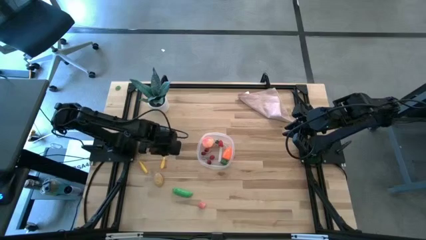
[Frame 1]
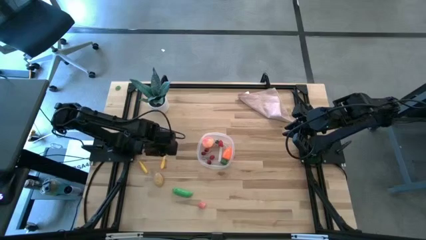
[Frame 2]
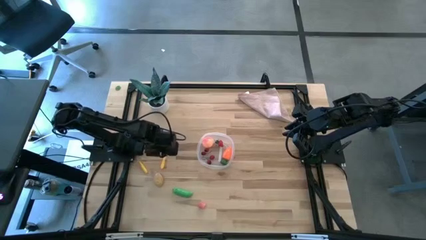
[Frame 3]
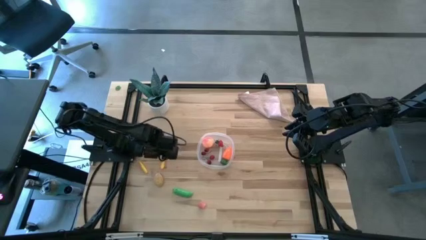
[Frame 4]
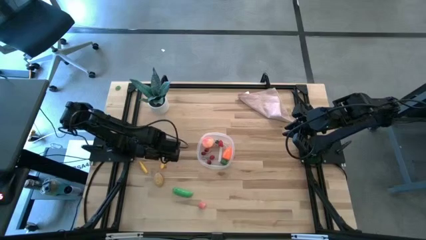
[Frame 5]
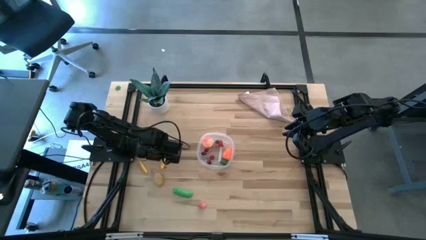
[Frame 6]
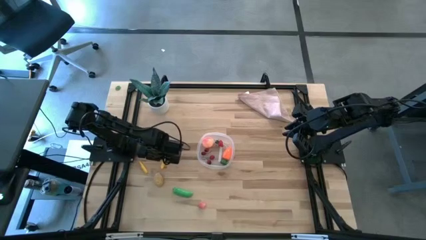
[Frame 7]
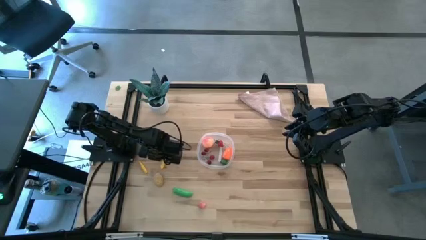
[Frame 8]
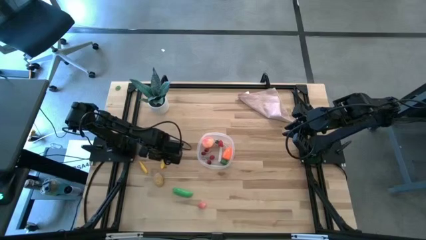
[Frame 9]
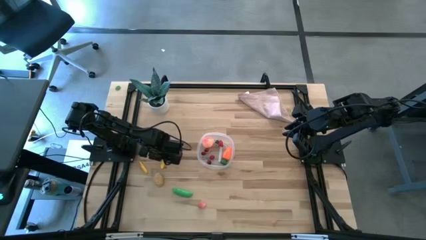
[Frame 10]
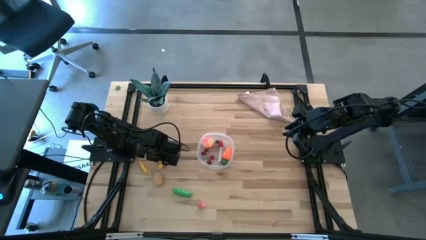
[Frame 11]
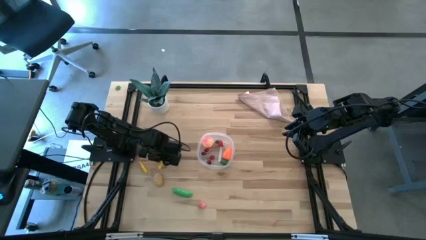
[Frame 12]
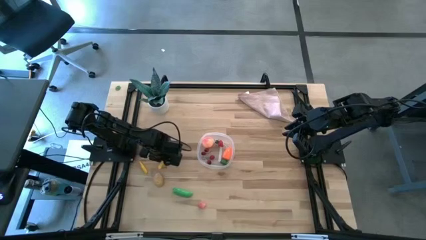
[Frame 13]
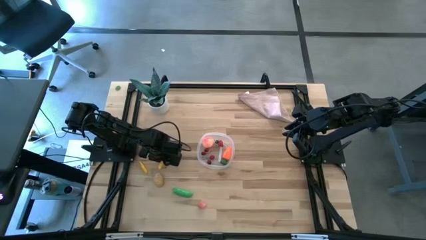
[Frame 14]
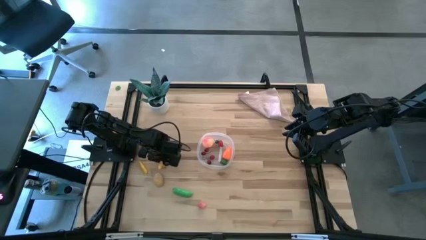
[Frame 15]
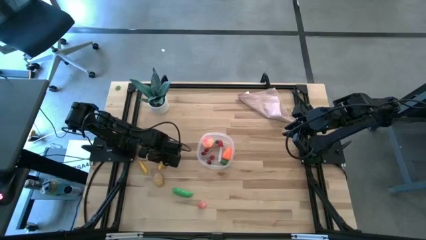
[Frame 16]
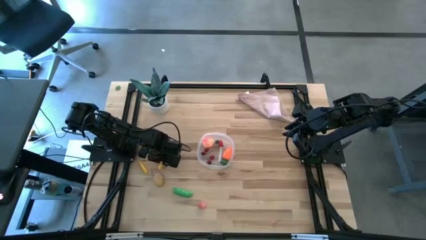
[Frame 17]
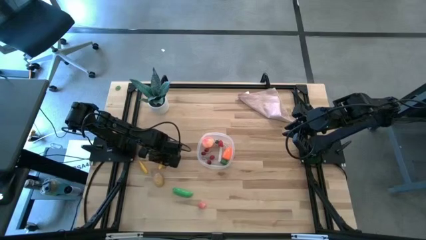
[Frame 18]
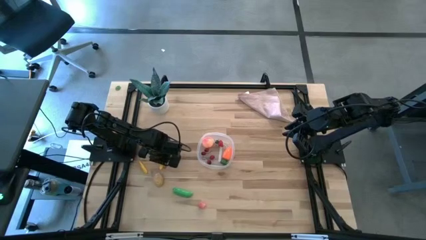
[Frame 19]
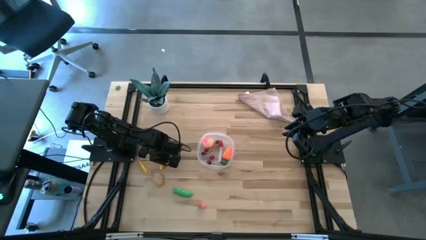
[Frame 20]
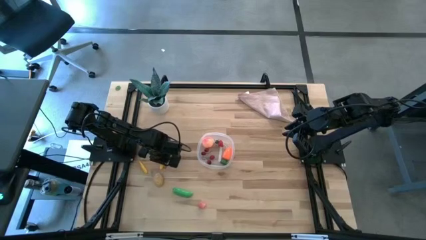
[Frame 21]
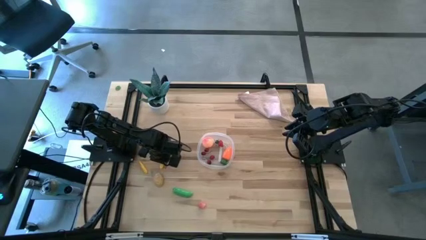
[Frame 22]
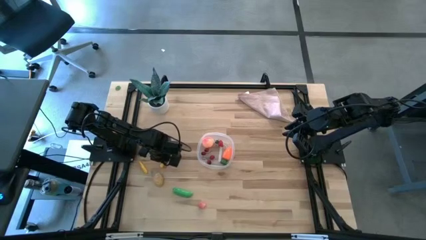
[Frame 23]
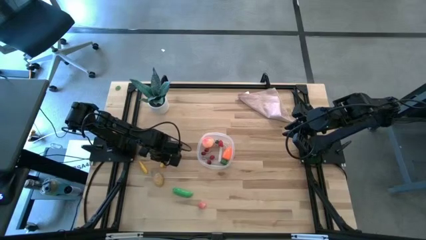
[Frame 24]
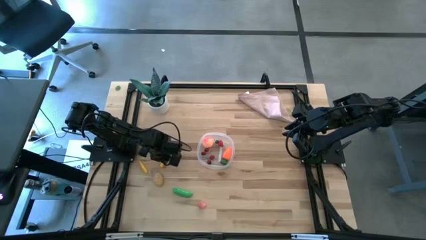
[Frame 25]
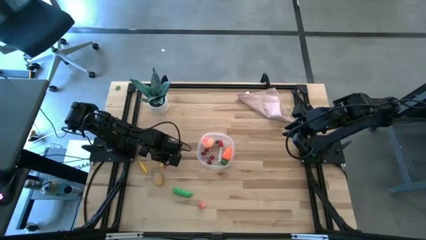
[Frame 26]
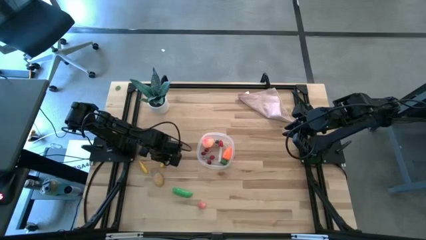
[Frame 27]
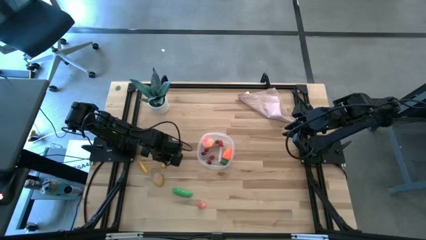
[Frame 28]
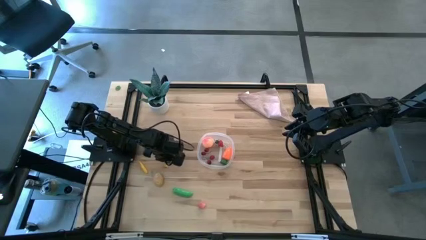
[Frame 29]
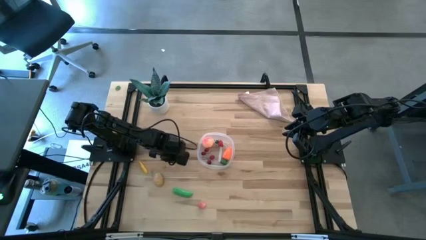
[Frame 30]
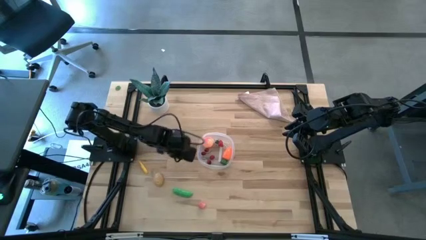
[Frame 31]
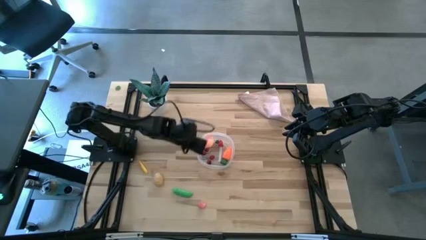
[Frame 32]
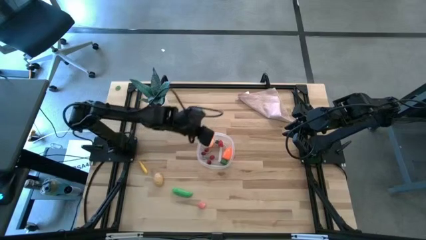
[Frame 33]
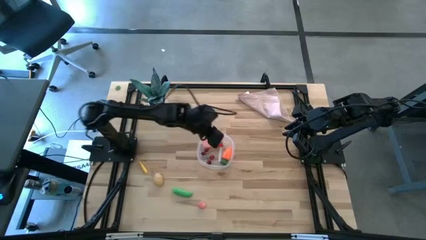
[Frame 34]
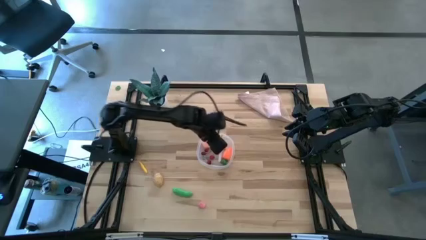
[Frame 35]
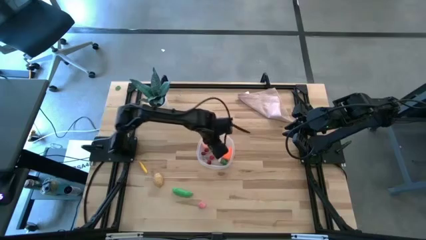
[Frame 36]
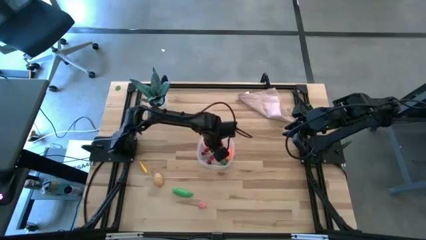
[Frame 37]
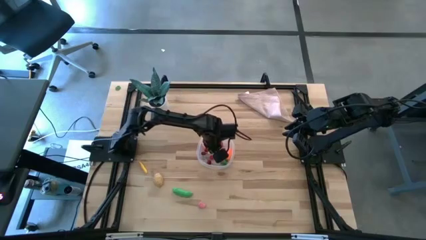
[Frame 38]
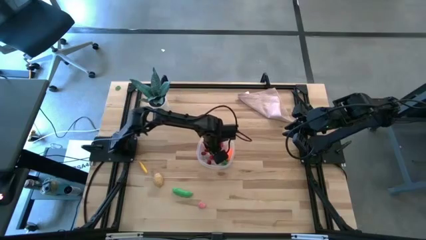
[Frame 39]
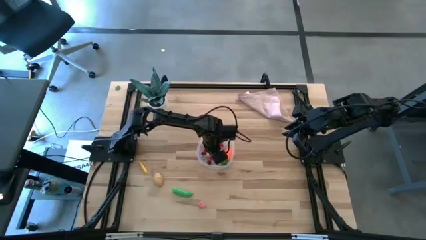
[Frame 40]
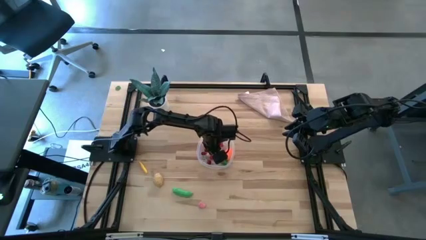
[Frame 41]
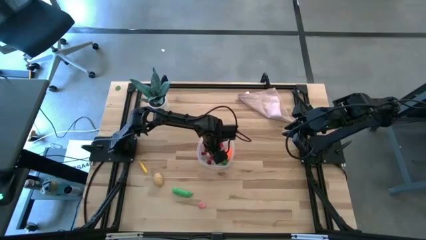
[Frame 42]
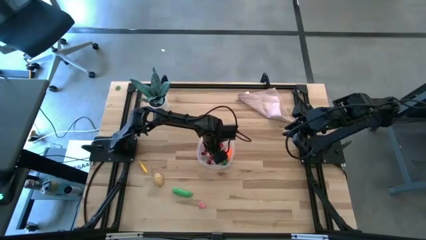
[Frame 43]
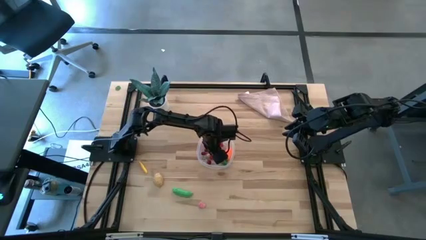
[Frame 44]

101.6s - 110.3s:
Task: Pick and placing Produce into tupperware
Put the yellow zucchini into the transparent bin

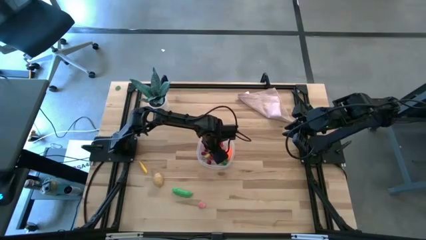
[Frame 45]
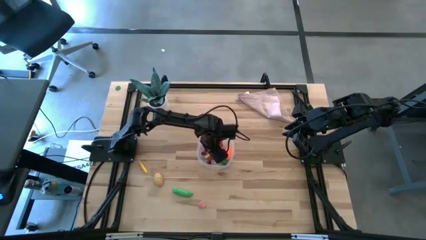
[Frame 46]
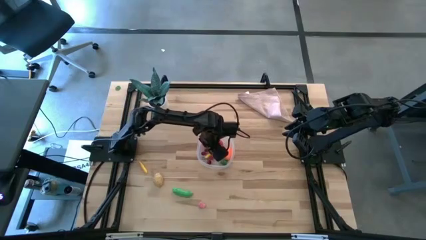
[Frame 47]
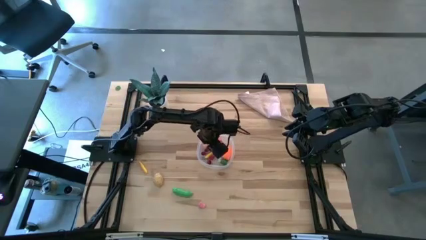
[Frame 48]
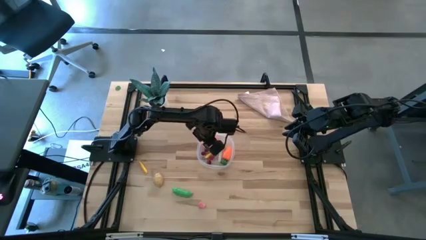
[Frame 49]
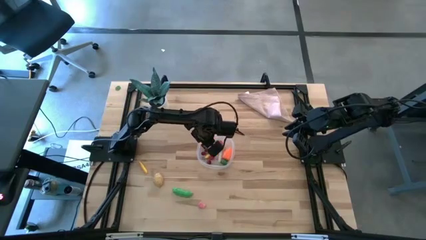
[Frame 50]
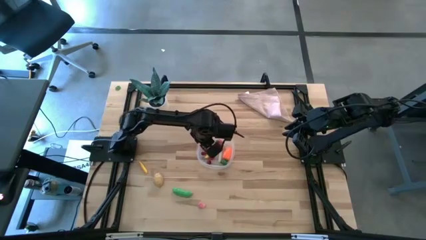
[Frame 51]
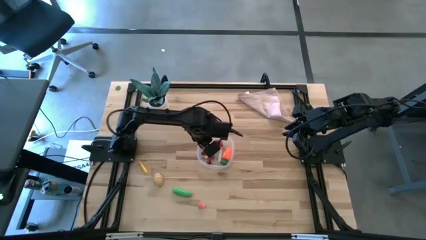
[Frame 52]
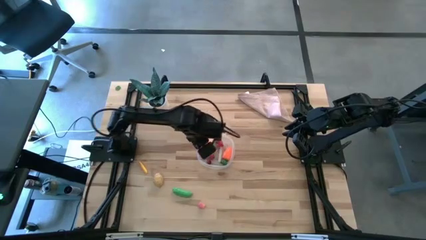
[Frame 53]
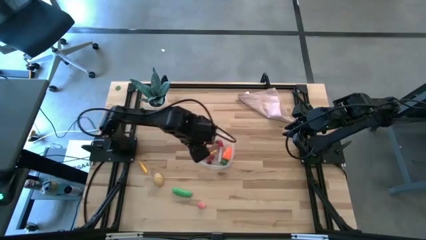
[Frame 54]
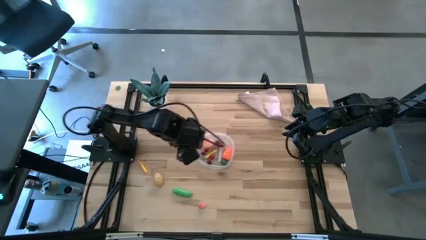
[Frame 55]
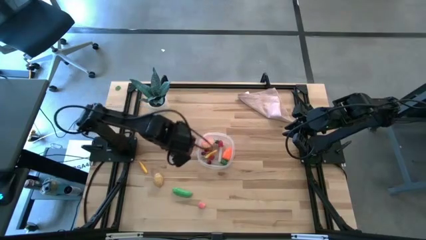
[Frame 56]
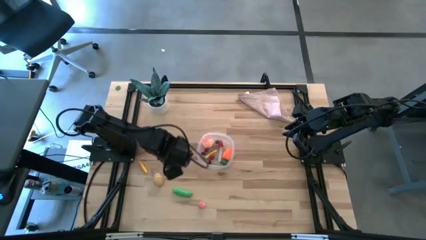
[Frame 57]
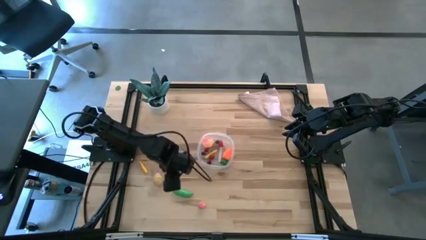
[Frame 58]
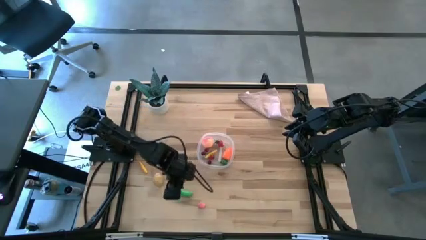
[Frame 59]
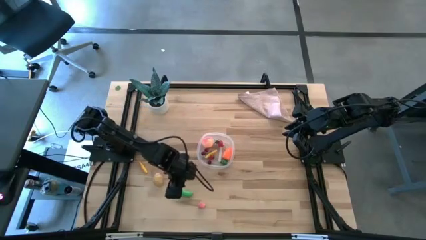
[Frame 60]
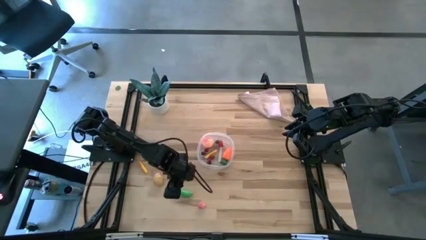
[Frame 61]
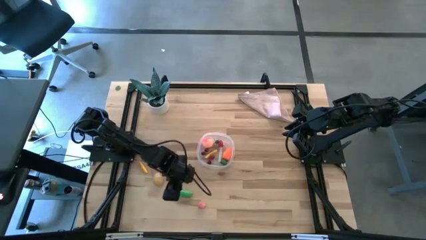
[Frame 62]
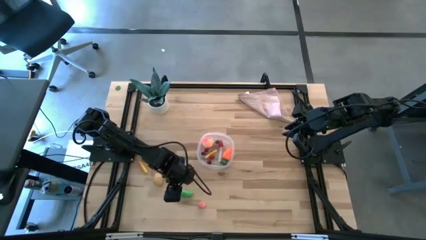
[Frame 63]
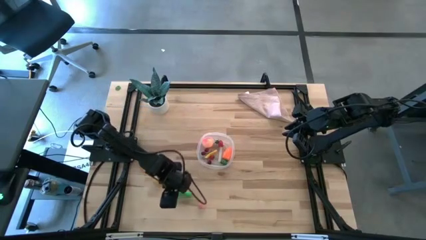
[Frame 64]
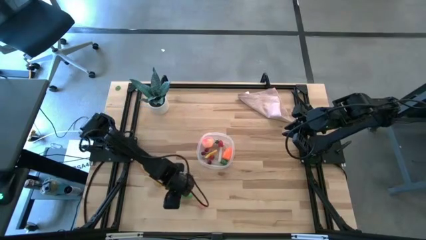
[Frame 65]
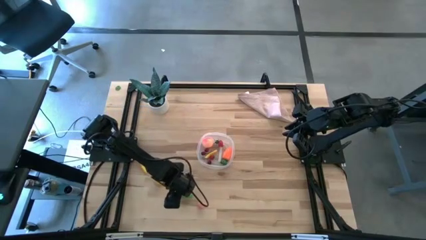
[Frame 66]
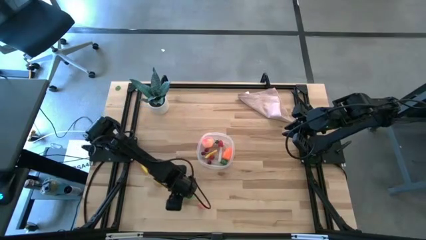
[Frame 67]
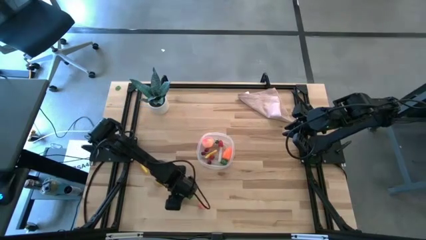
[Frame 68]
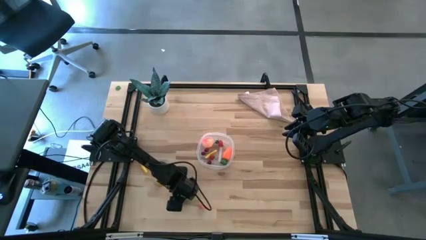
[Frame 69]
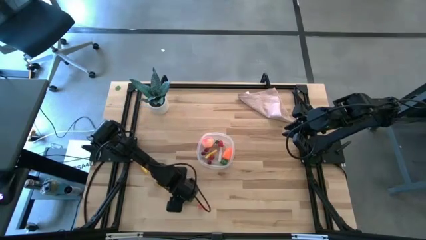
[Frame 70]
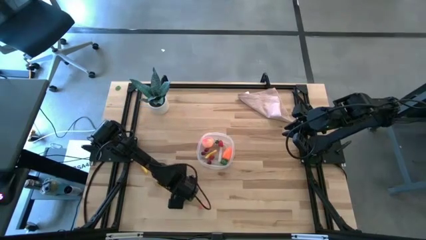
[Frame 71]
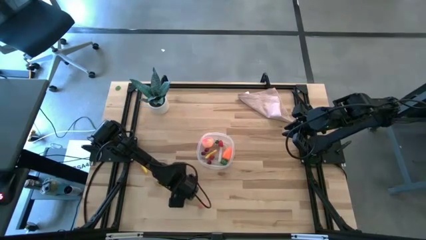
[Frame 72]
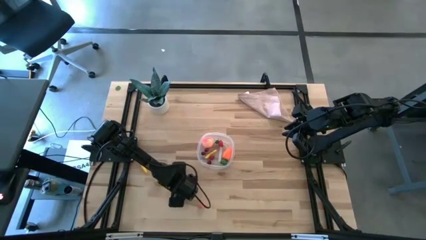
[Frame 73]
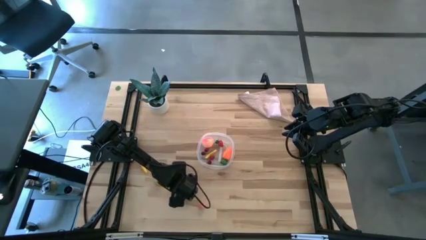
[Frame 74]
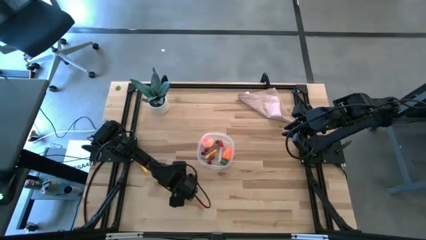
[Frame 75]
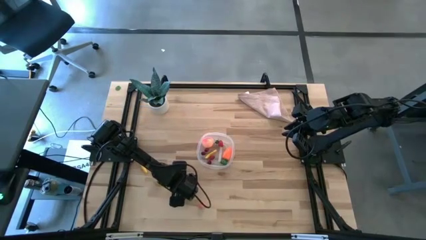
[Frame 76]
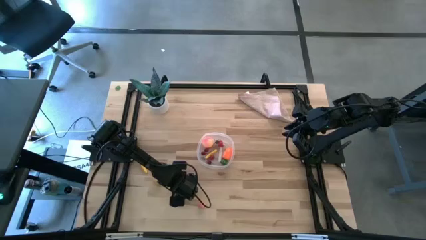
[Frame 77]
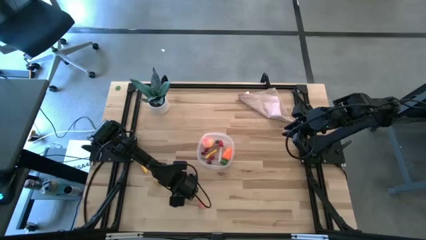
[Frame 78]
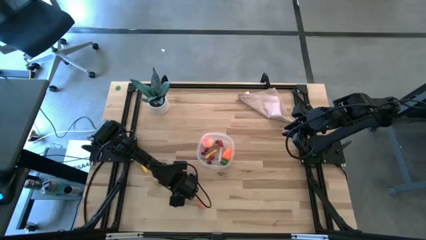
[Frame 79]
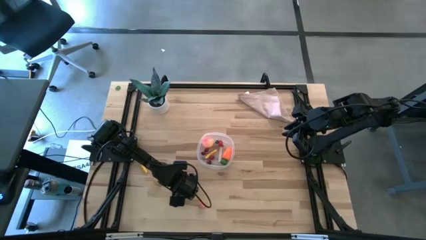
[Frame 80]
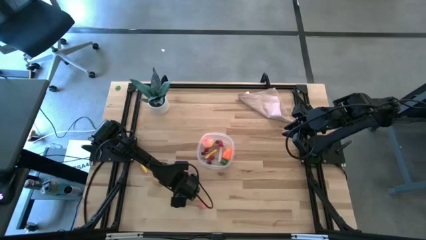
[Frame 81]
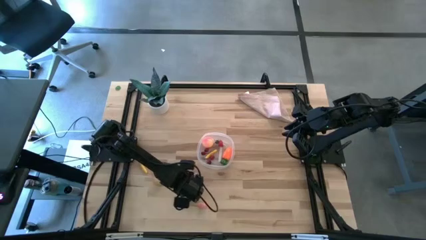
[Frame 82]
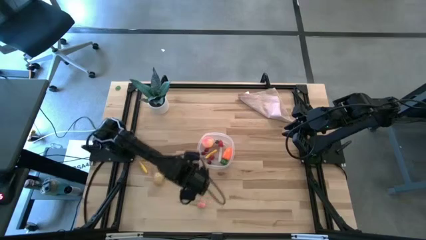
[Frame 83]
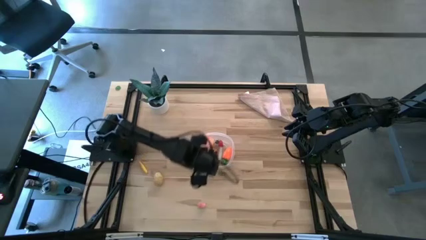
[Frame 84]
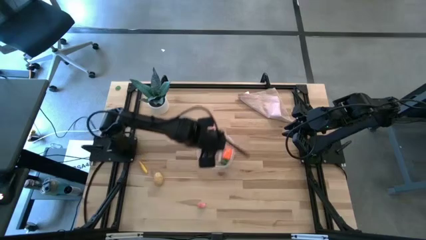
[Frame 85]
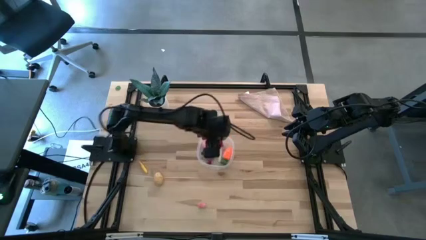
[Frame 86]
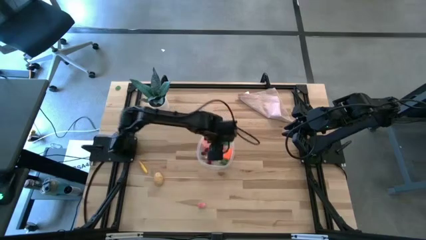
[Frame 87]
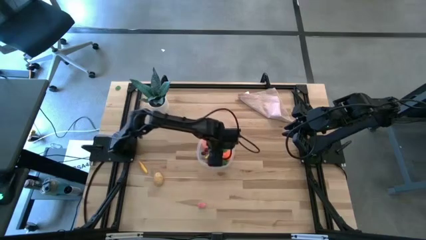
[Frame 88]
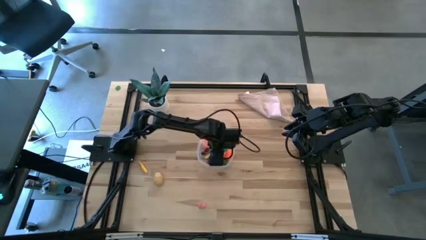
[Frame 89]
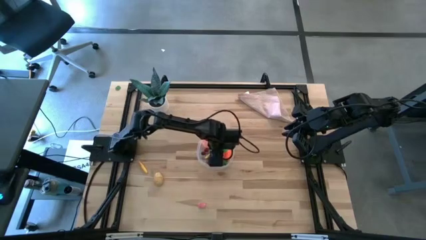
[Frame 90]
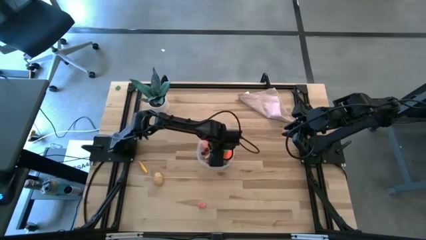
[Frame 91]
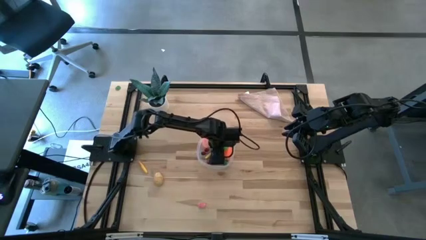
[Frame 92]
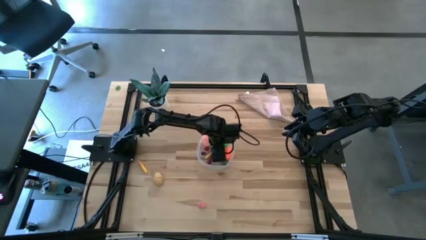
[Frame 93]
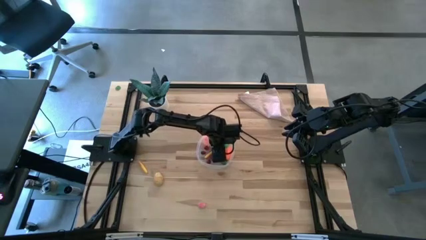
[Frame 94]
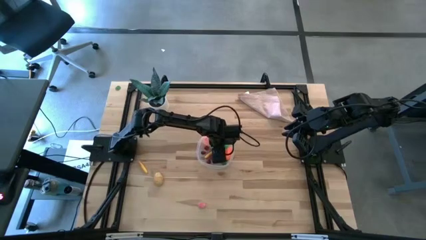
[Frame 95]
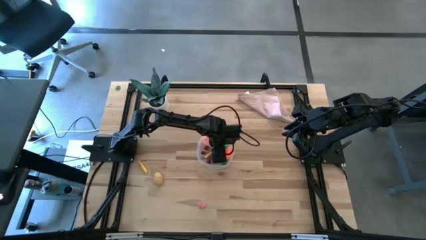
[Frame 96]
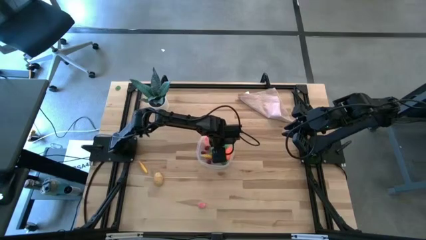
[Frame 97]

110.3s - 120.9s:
Put the green pea into the transparent bin
